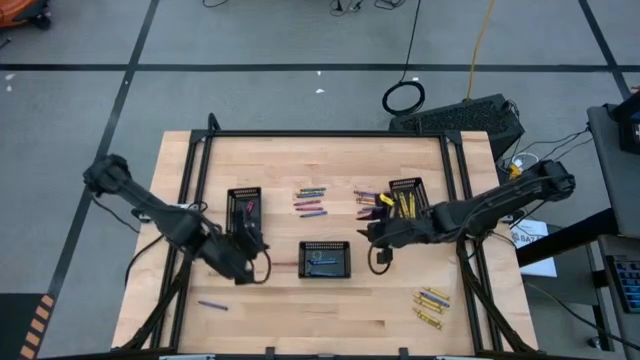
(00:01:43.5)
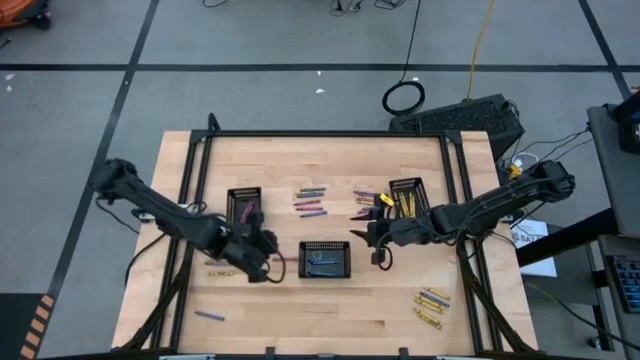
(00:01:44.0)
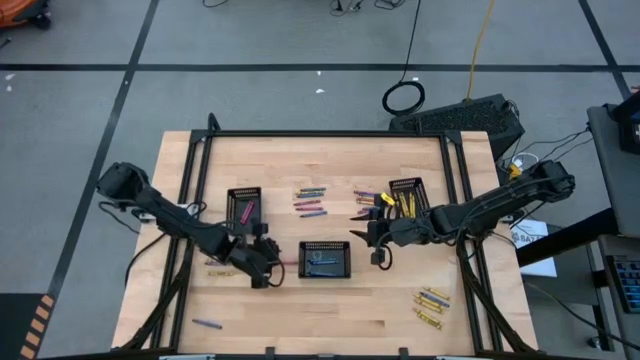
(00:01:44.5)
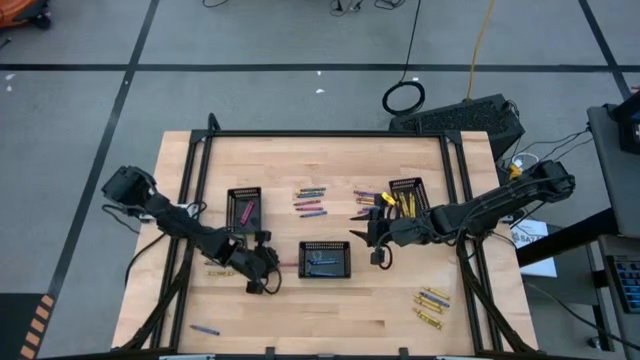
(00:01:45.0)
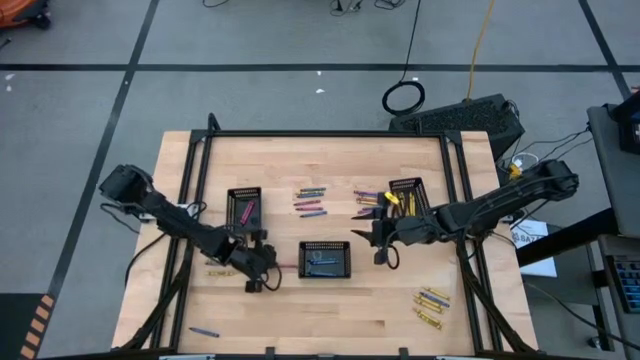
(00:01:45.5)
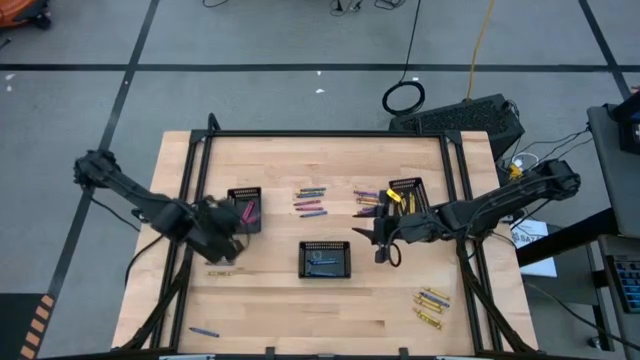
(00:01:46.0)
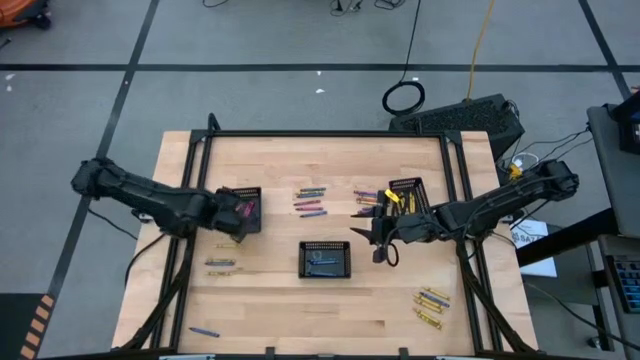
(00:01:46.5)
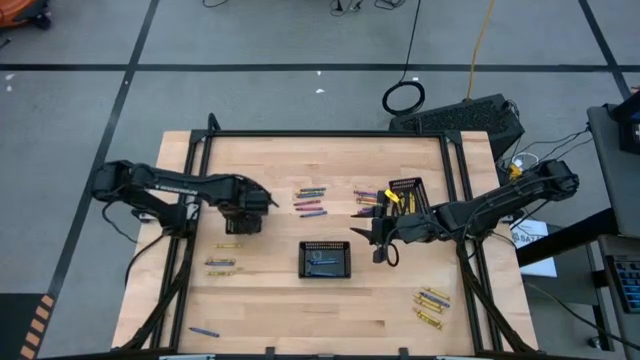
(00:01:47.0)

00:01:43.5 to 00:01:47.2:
Task: Sort crayons
Put the red crayon into the left black basket

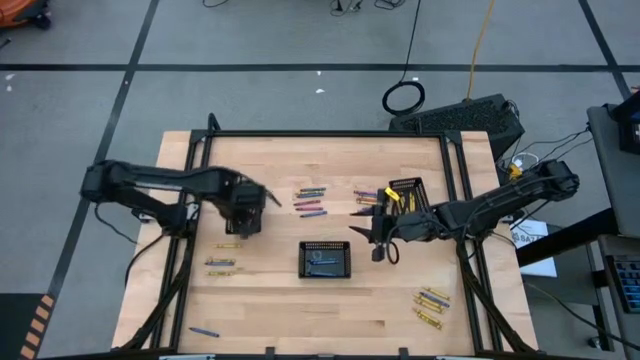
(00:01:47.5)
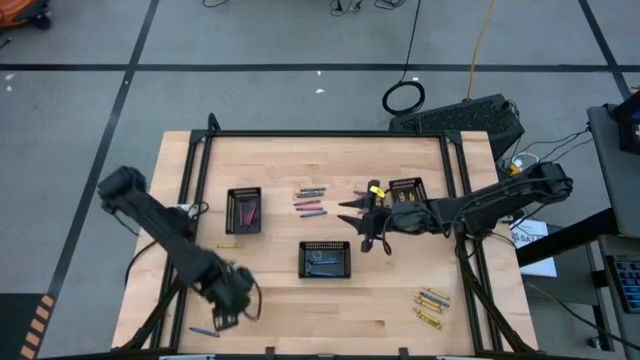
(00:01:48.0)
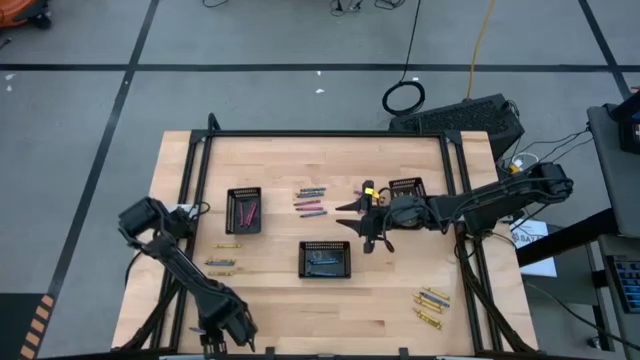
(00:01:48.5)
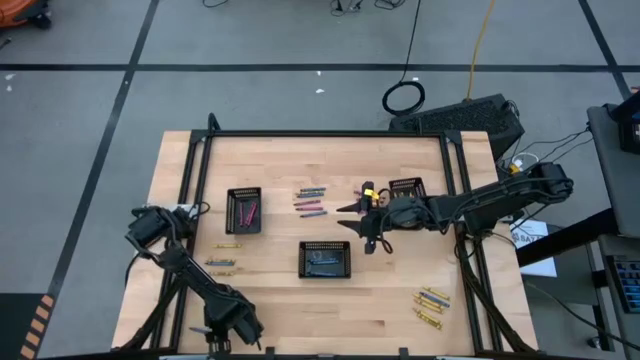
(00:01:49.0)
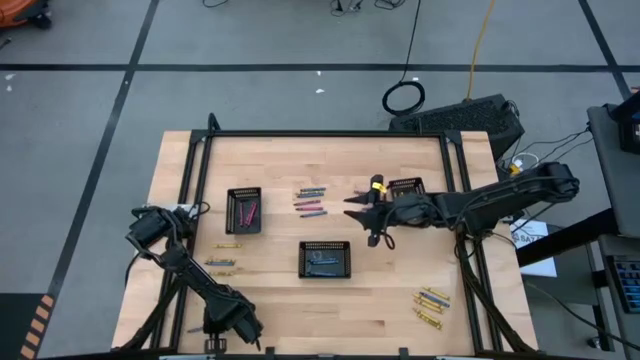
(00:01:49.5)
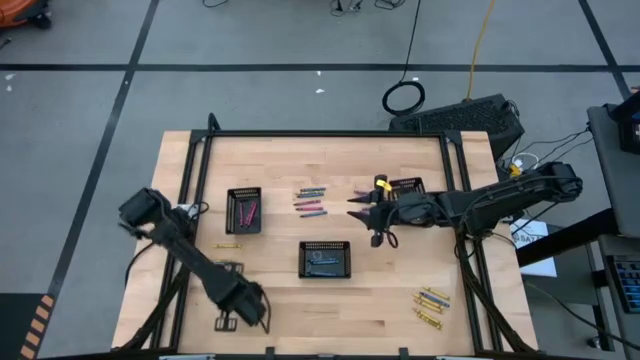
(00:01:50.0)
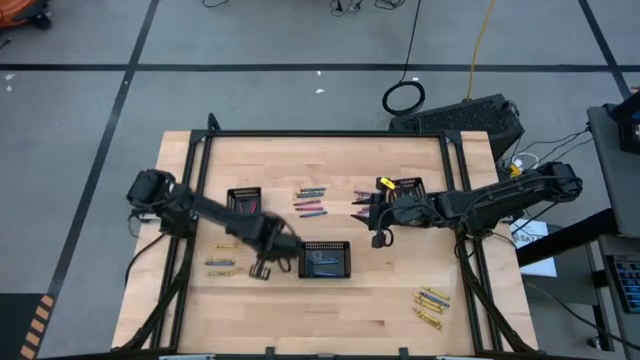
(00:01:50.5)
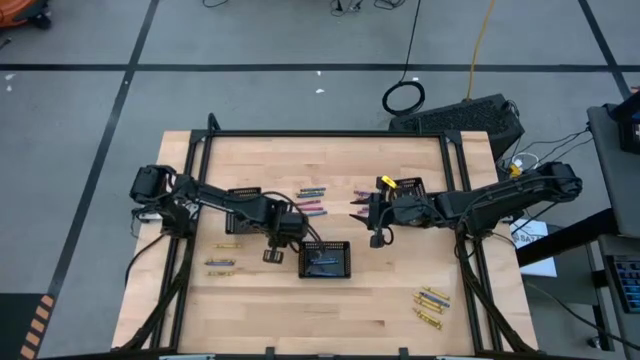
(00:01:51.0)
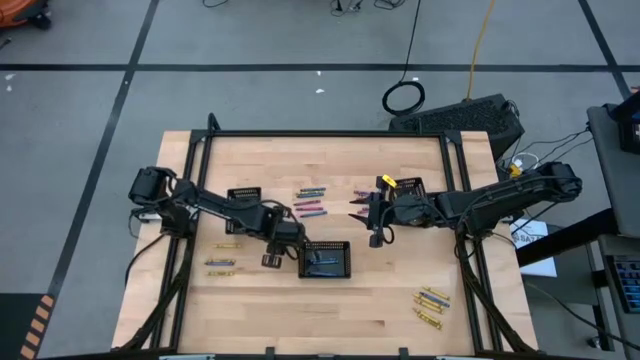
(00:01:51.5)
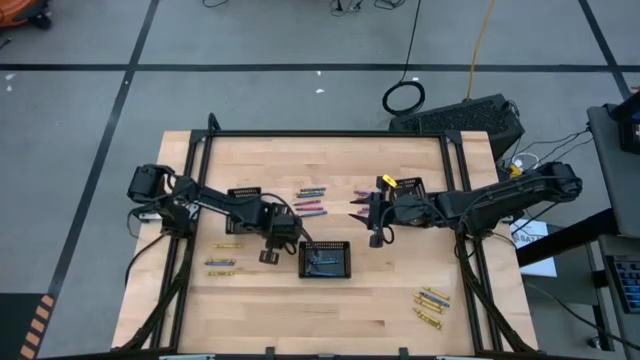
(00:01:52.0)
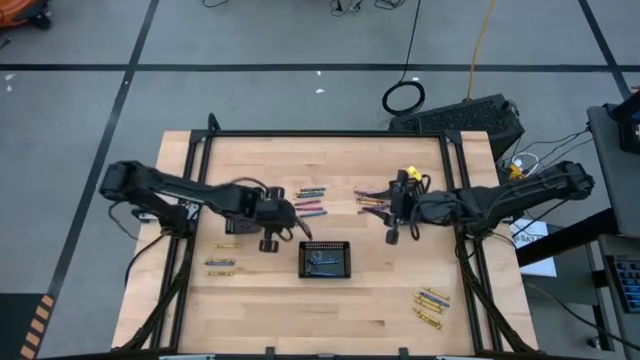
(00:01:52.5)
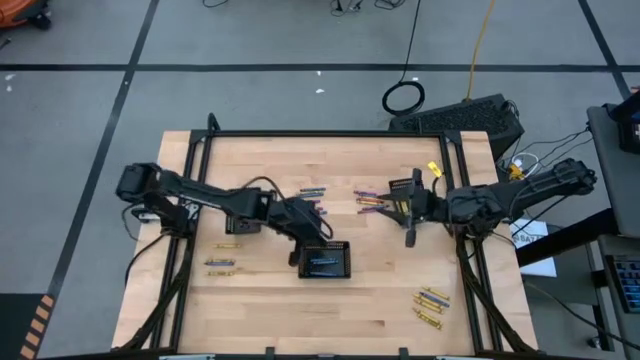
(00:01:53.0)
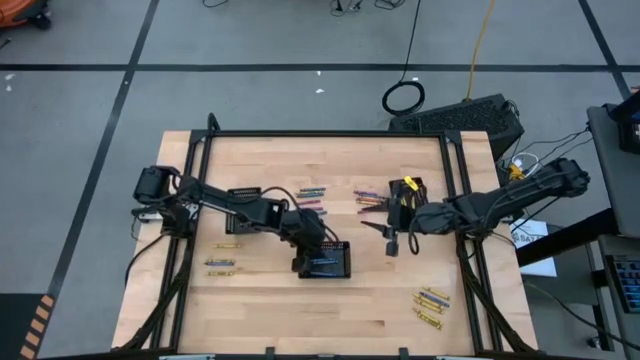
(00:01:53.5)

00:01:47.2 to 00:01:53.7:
Put the blue crayon into the center black basket

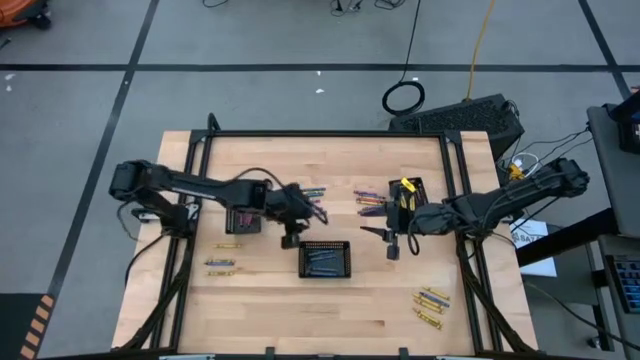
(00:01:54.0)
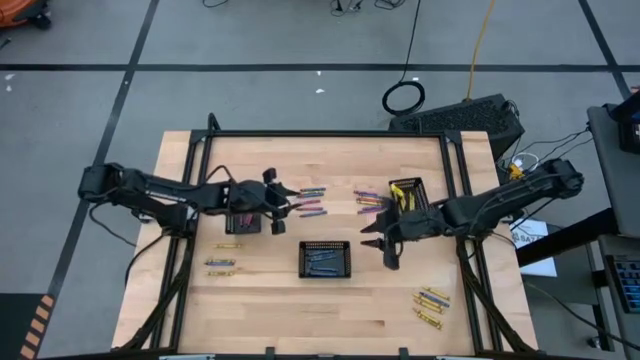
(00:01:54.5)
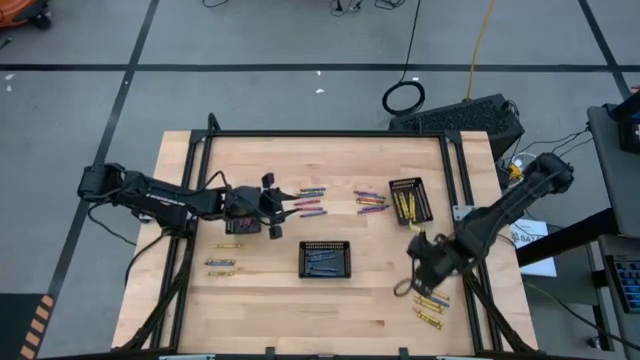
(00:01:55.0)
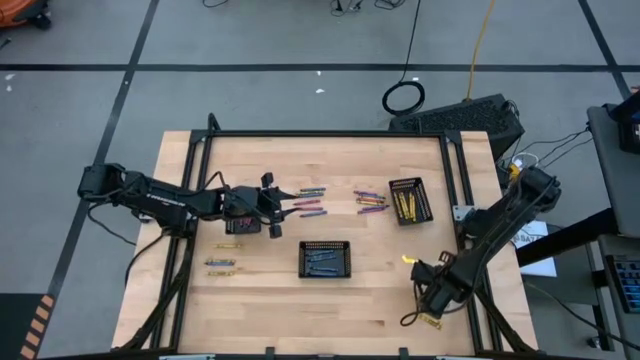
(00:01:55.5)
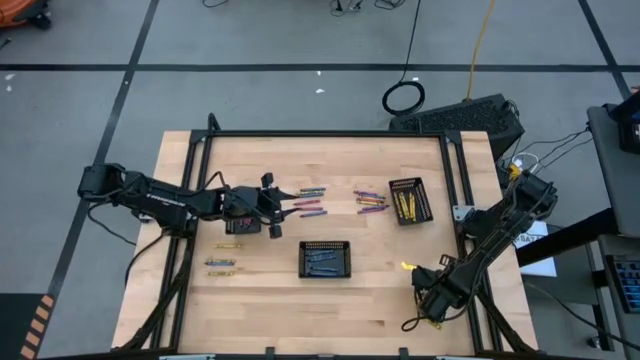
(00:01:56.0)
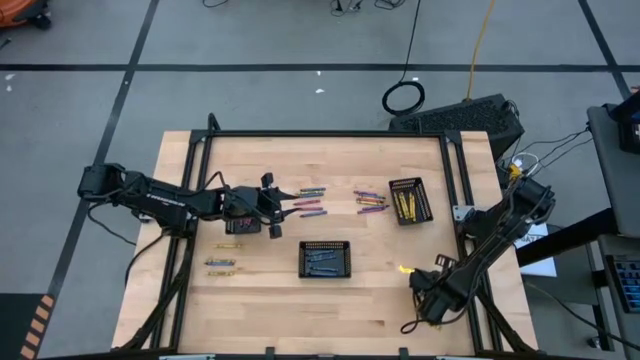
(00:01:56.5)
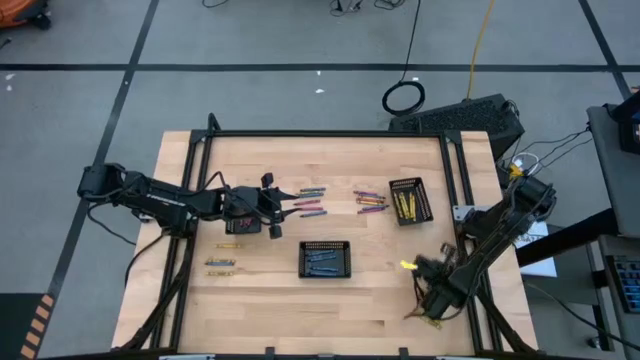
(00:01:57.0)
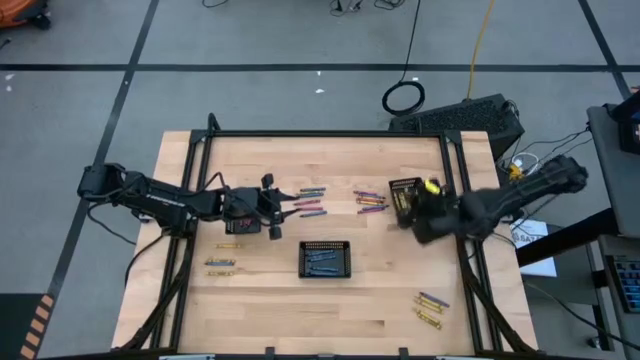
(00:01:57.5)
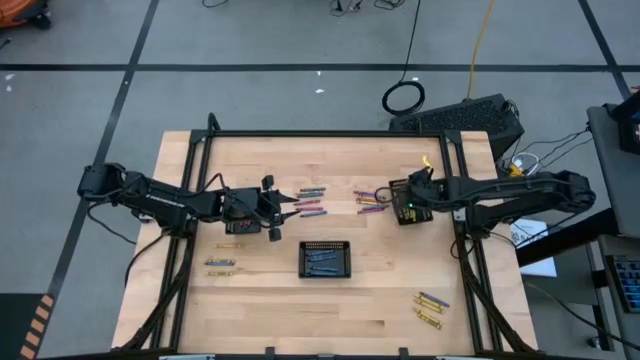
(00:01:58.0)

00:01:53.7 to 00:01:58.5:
Put the yellow crayon into the right black basket

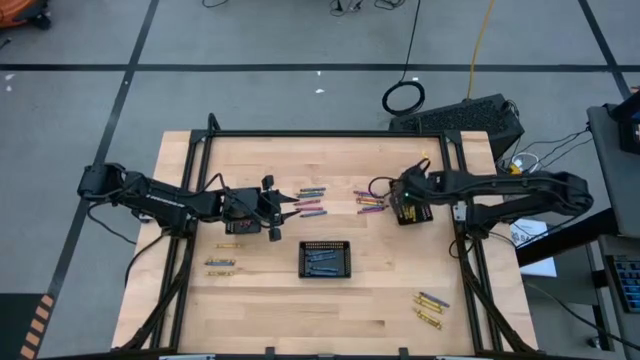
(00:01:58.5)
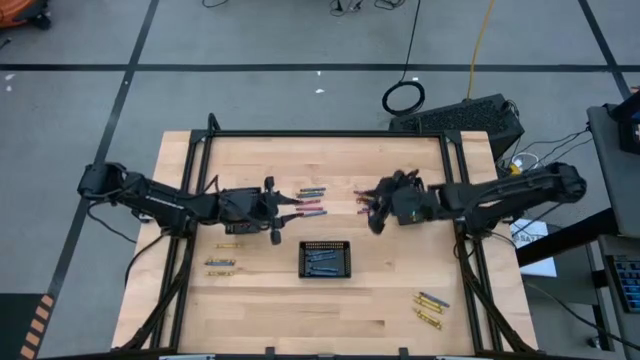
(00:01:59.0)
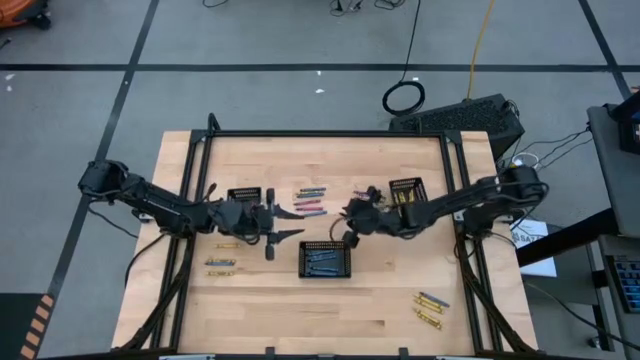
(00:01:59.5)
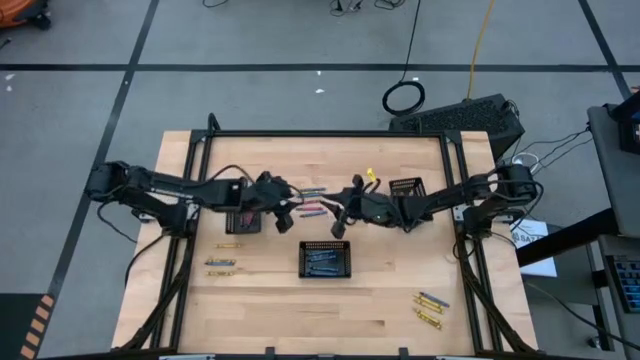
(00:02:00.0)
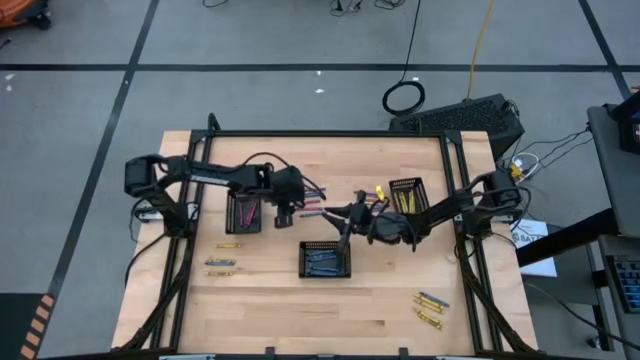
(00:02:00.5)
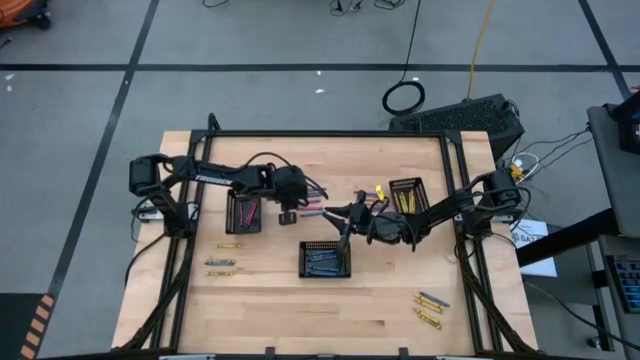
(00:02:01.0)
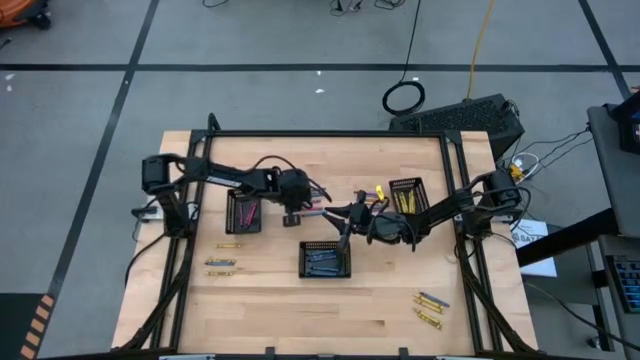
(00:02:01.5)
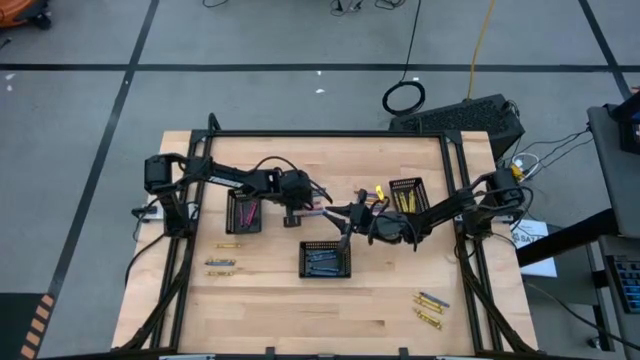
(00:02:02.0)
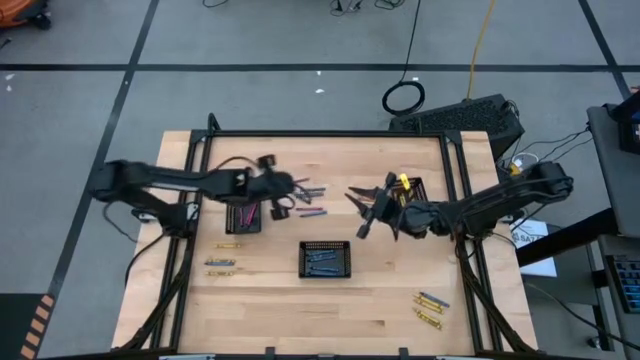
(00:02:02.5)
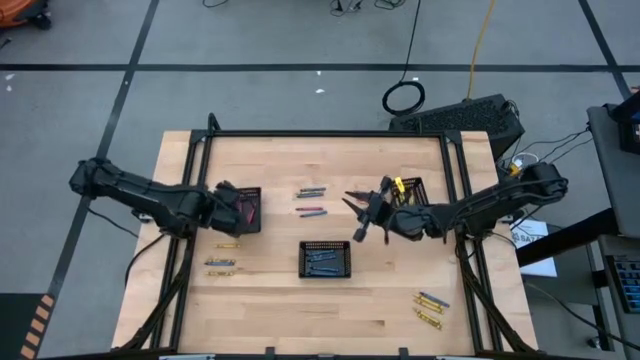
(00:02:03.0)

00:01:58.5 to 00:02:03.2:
Put the red crayon into the left black basket

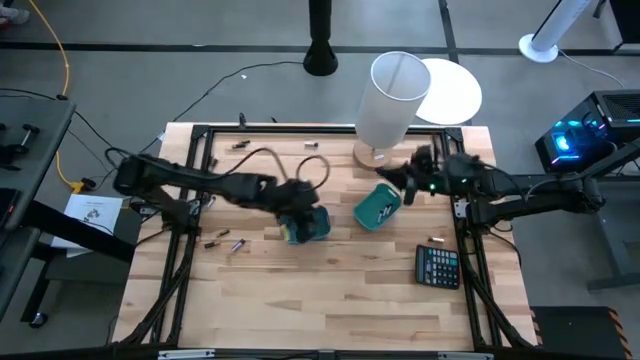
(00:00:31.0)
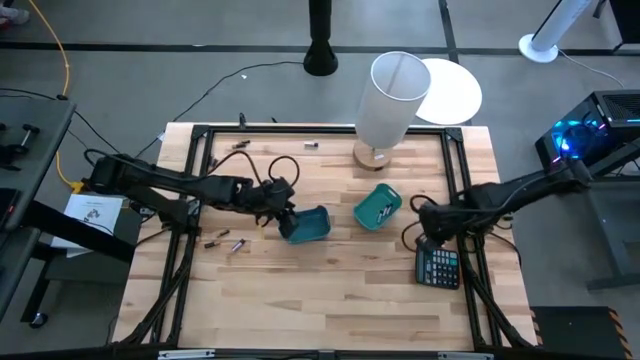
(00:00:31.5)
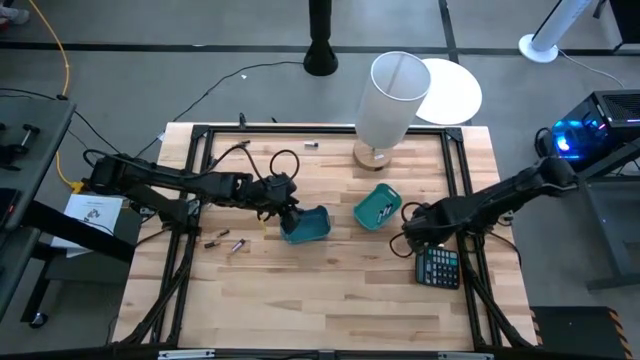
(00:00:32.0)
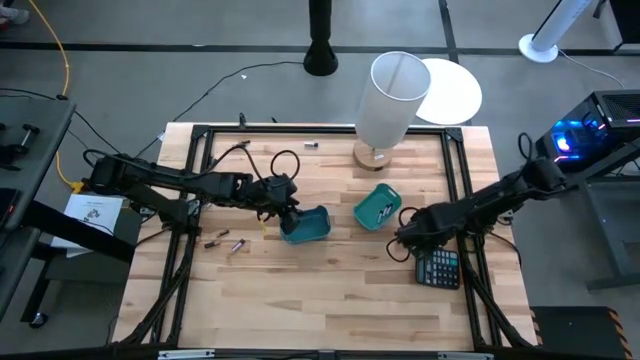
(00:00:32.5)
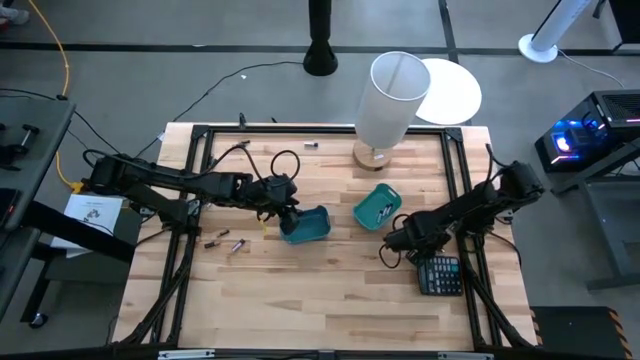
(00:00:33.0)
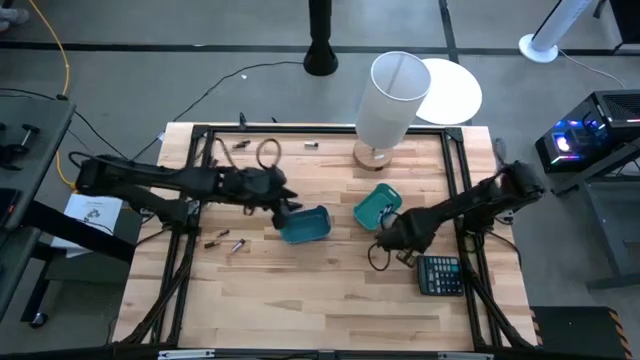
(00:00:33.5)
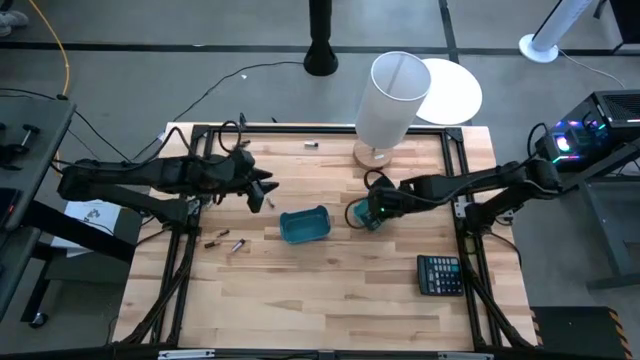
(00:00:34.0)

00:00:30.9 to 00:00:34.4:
Task: Sort batteries
Put the silver battery into the green bin
